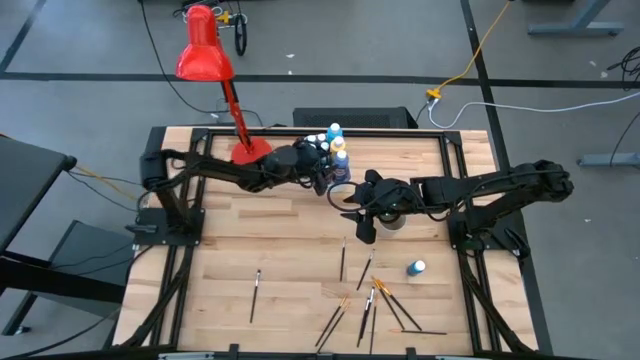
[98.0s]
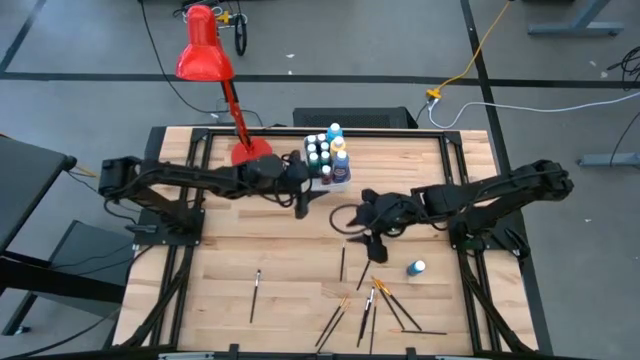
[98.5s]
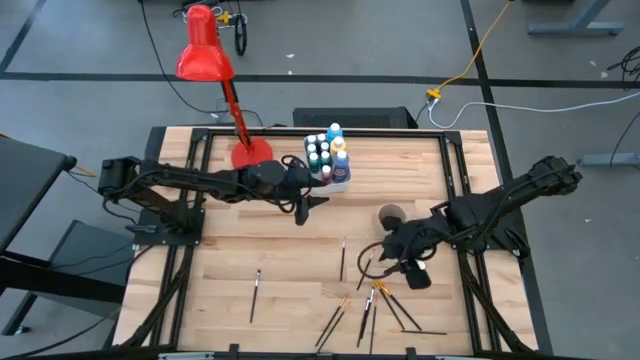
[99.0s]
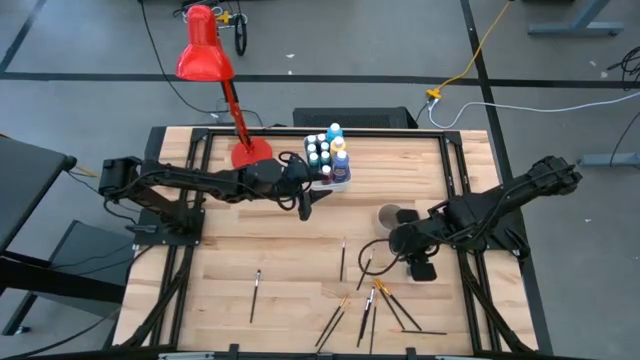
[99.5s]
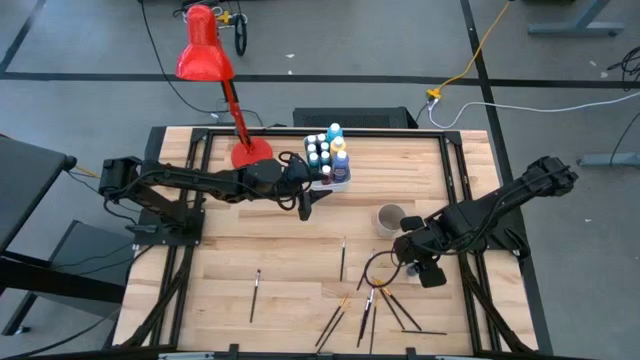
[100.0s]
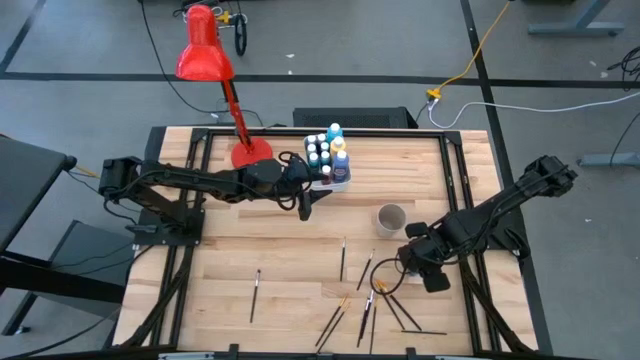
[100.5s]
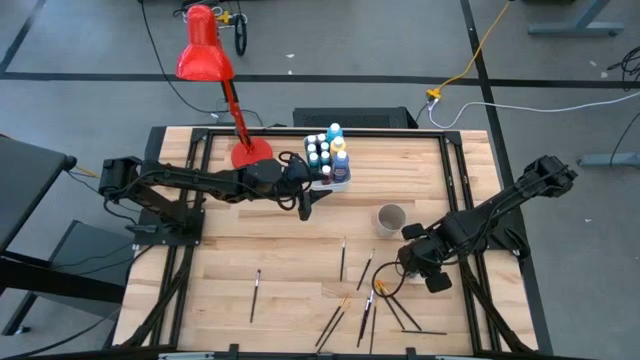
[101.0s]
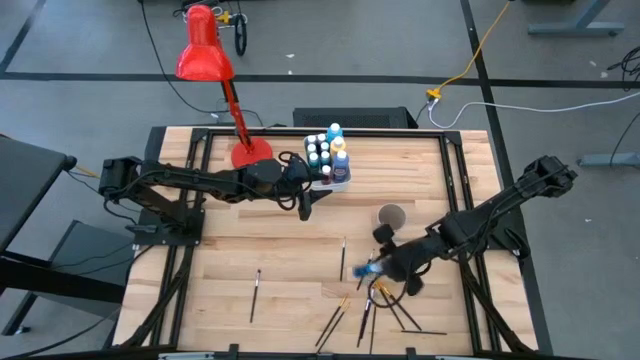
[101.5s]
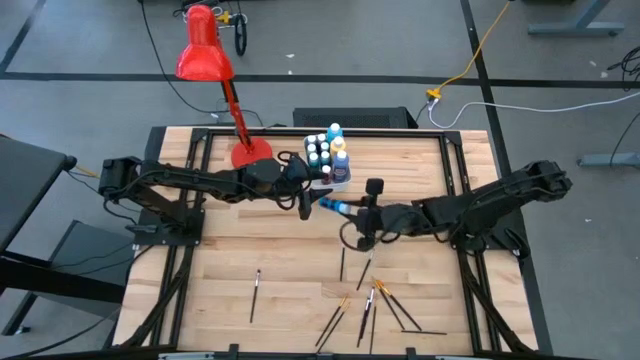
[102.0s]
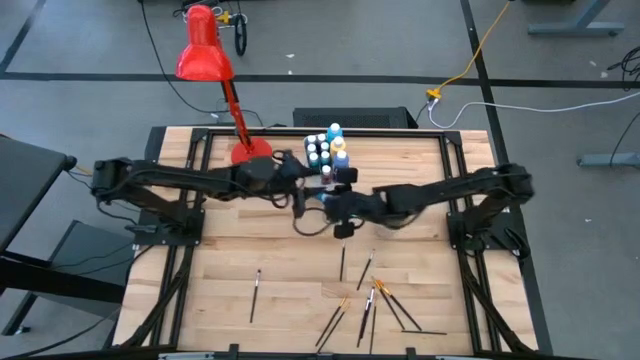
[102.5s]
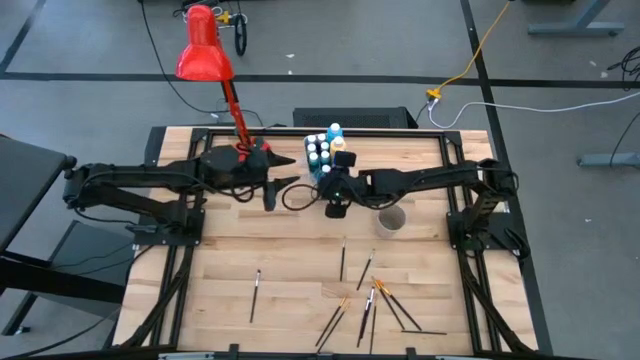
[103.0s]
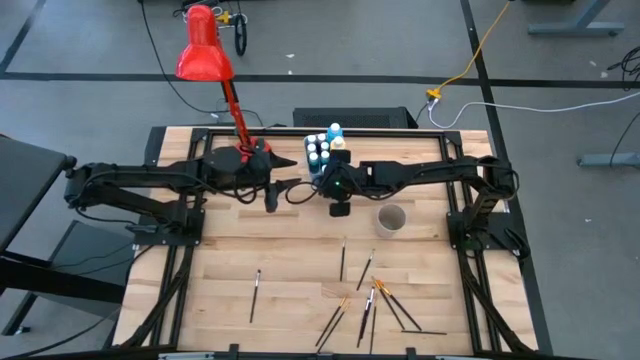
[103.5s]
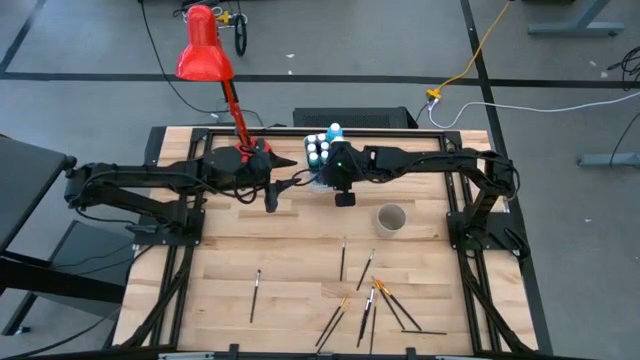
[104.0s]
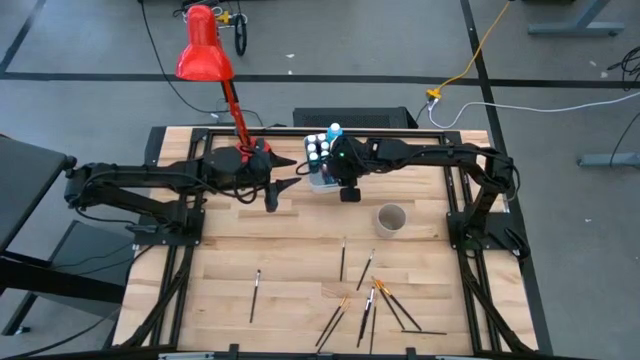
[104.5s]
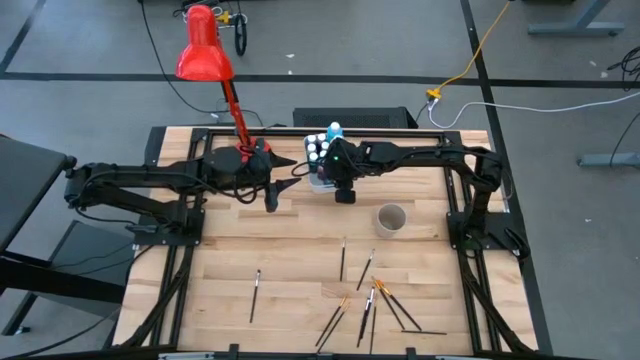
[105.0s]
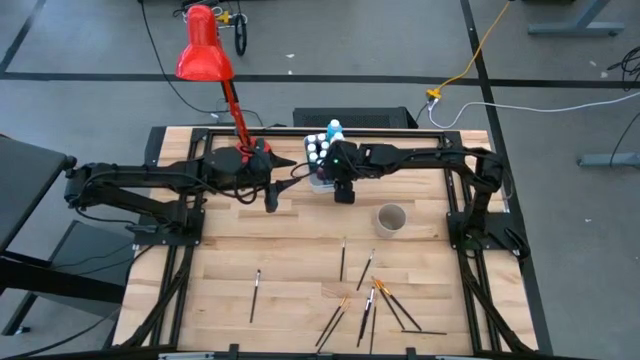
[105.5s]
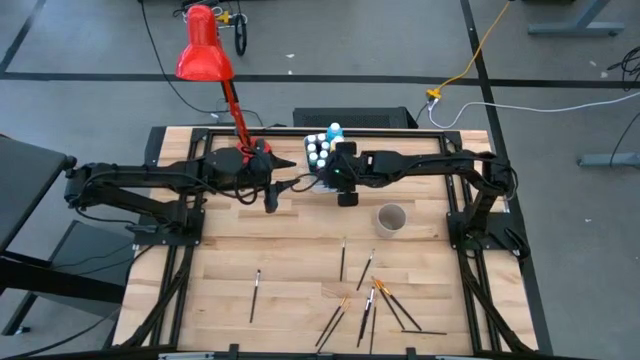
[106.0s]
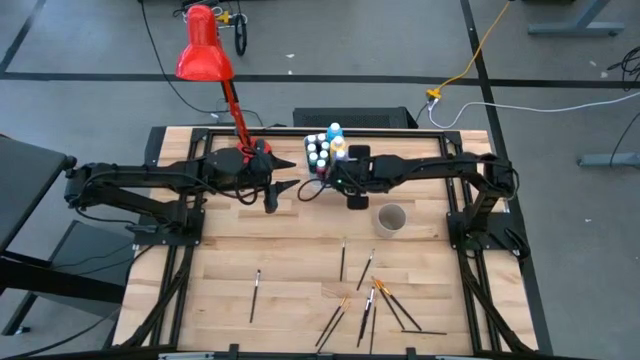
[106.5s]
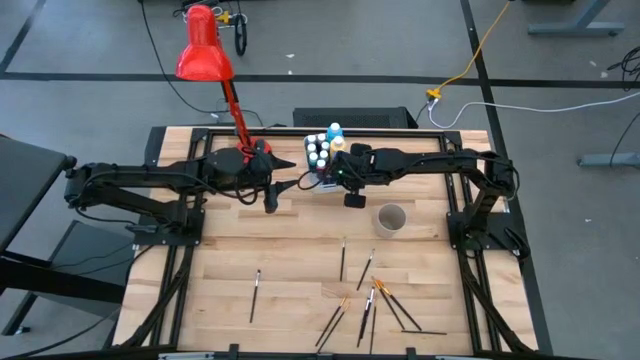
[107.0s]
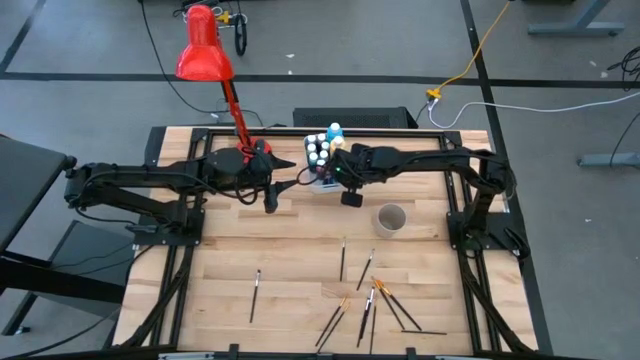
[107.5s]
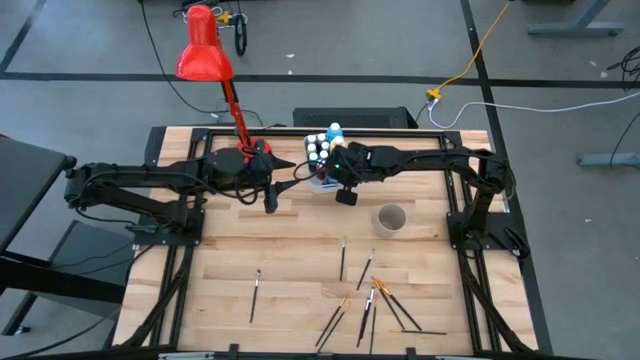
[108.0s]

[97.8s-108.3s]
Task: Pick & Place Paint Supplies
Put the small light blue paint bottle into the white bin

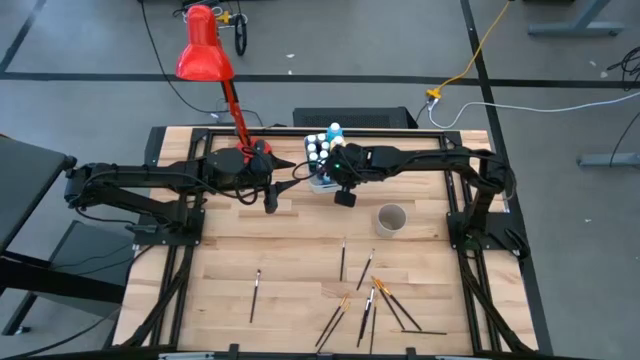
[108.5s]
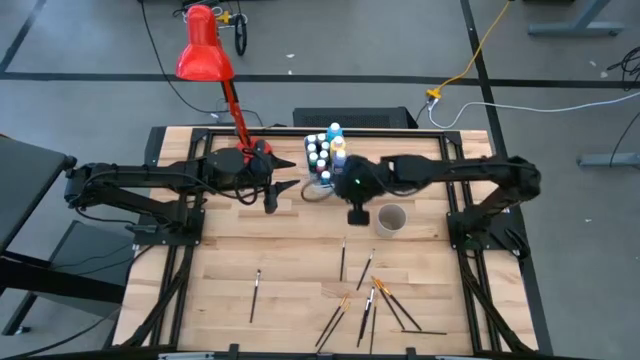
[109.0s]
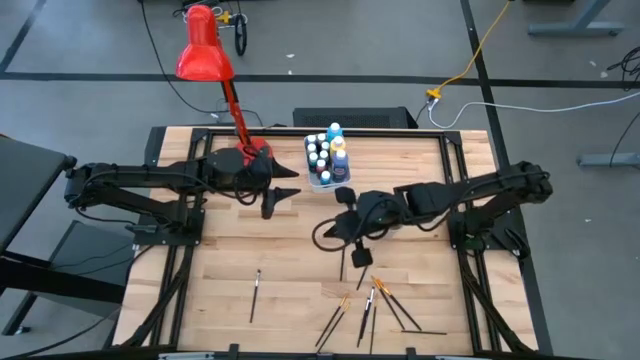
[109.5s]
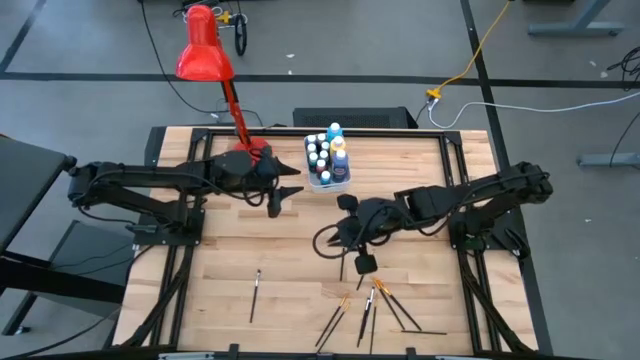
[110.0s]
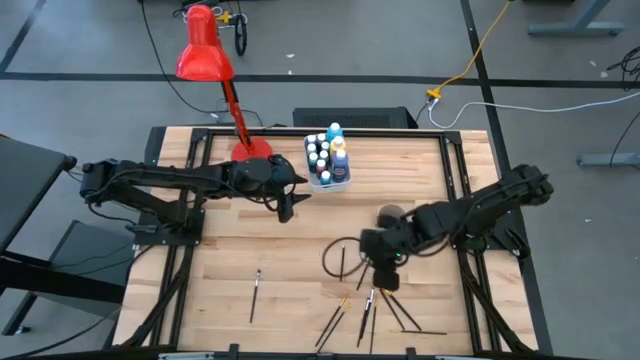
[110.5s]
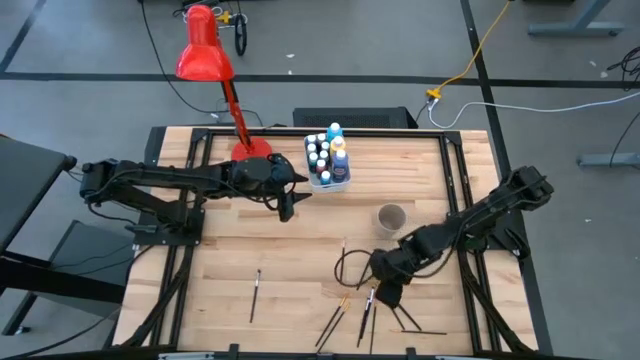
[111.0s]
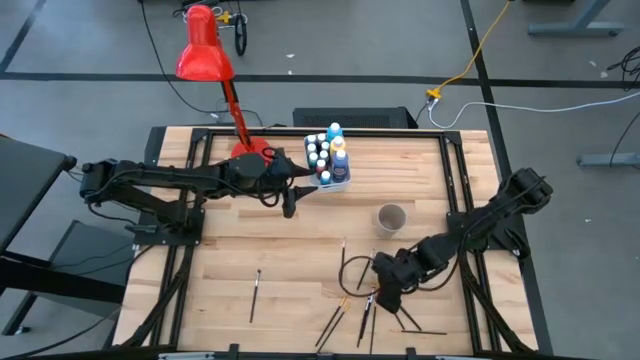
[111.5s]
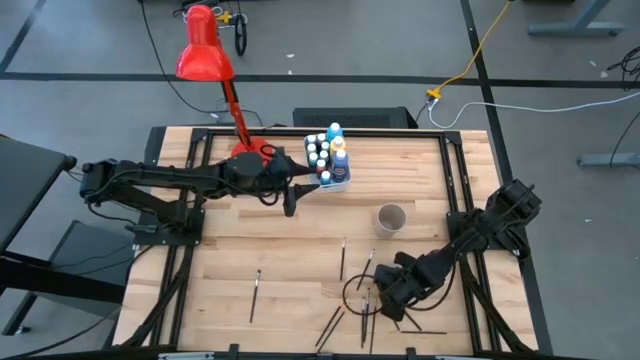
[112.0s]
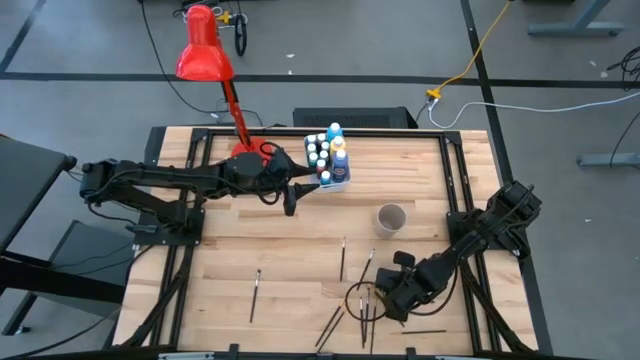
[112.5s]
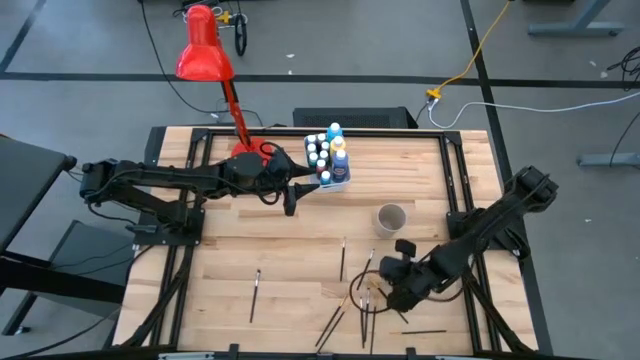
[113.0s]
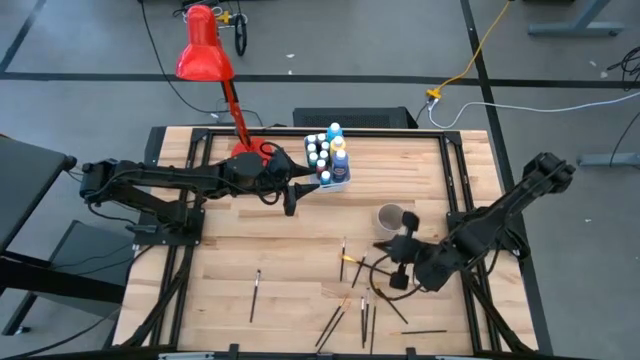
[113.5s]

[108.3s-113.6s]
Put the gold paint brush into the gray cup

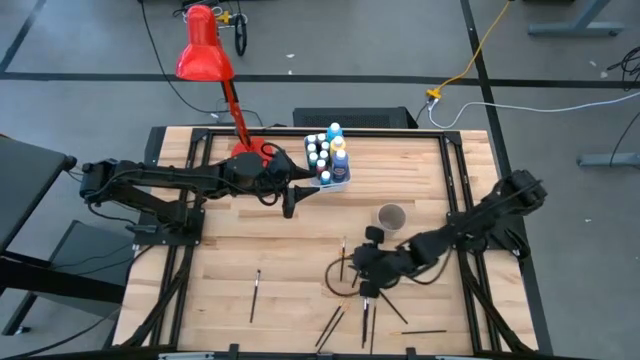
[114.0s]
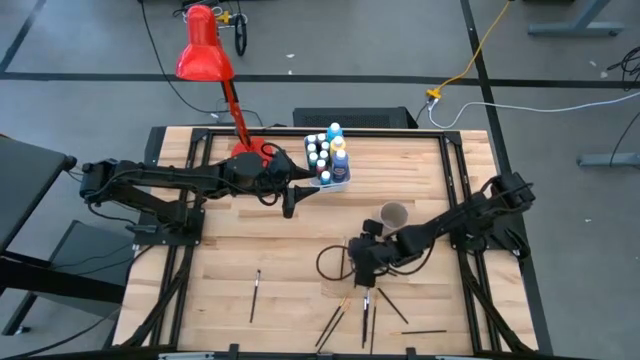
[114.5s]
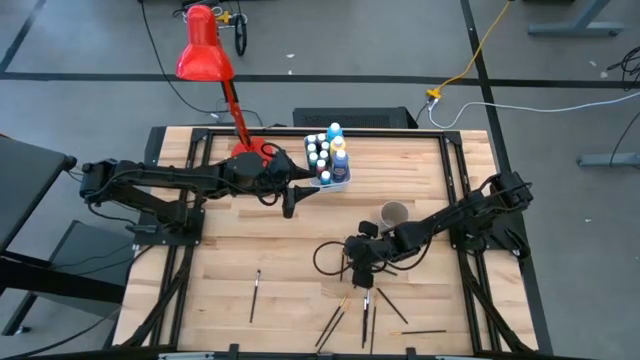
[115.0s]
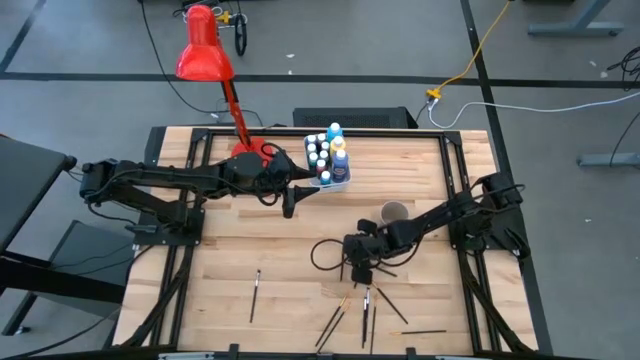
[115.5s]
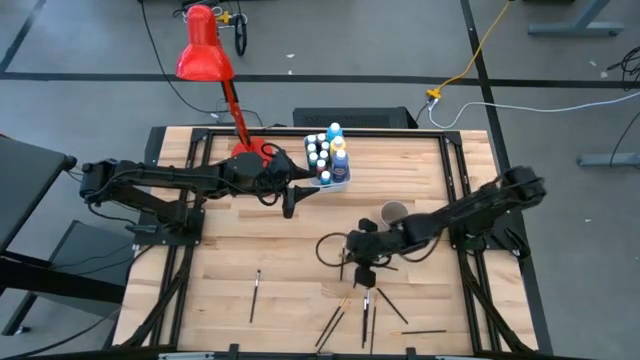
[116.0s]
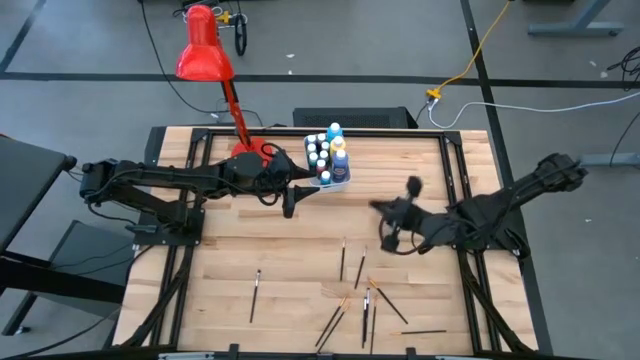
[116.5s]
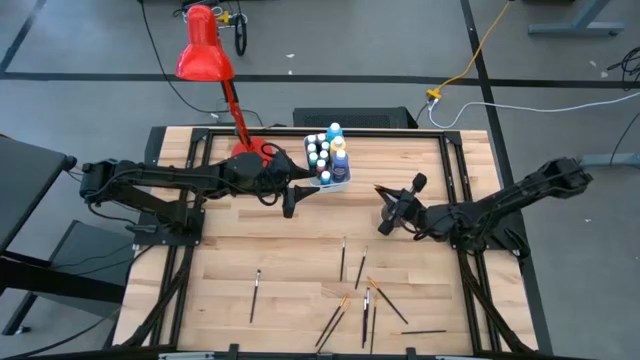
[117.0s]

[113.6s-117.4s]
Put the gold paint brush into the gray cup

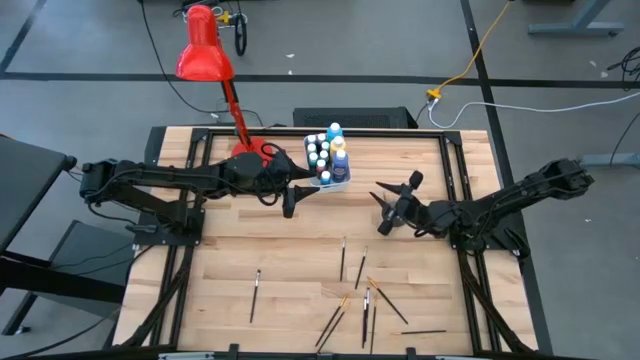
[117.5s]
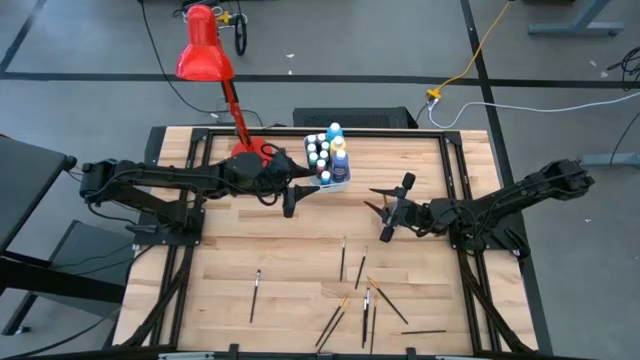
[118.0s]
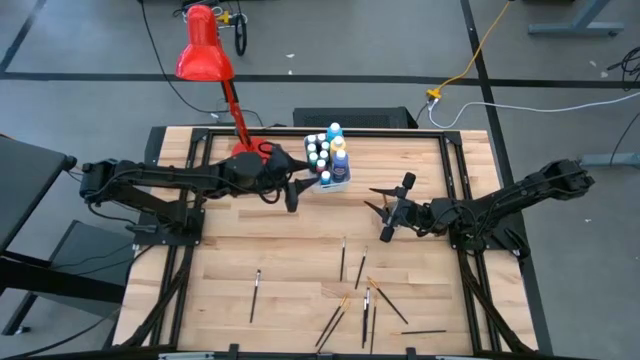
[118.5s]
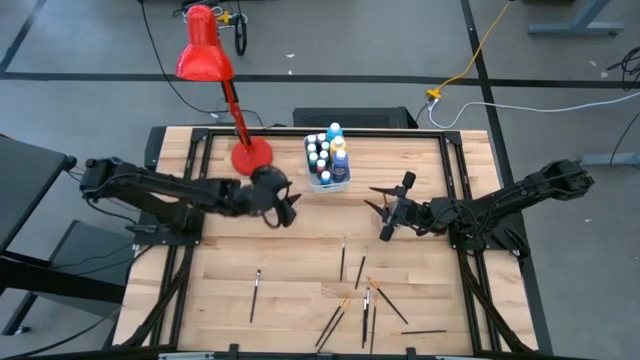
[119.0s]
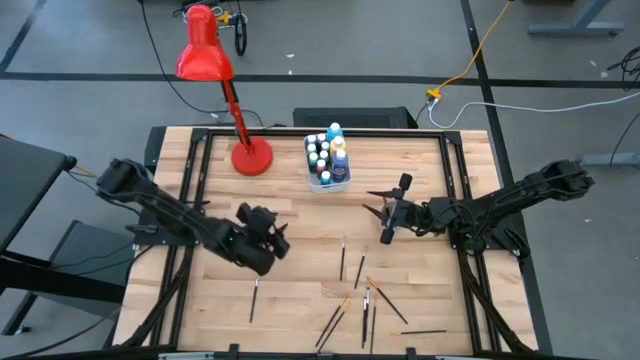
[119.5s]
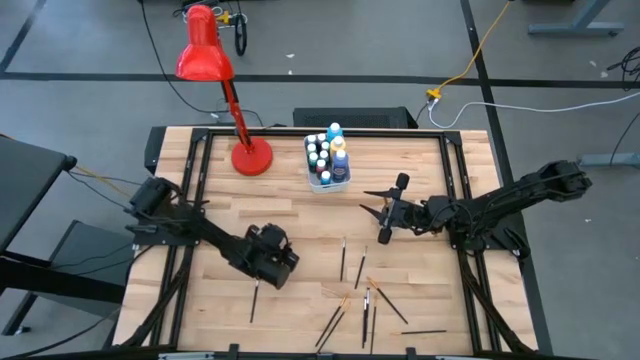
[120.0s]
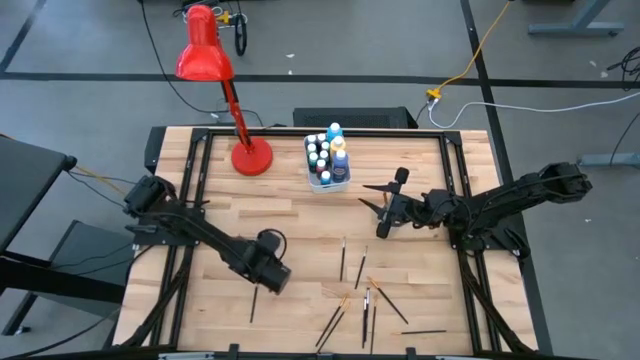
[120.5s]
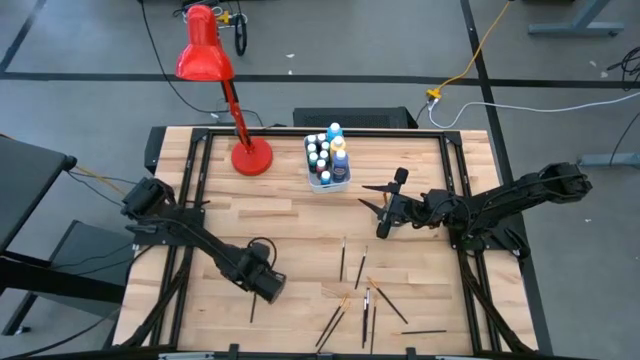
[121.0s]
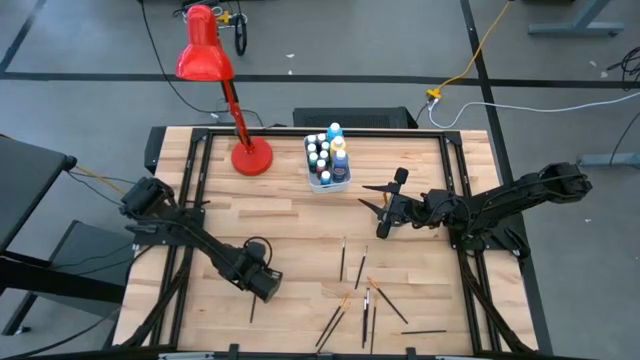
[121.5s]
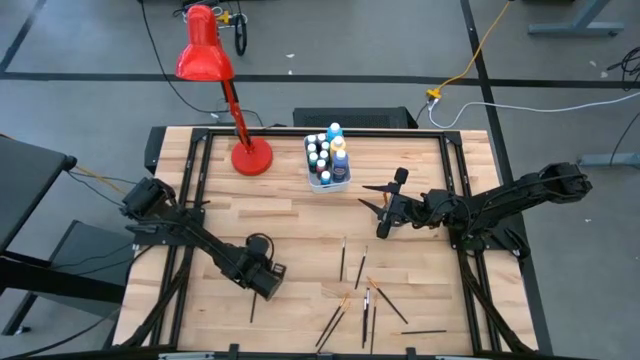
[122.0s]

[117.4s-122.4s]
Put the silver paint brush into the gray cup
